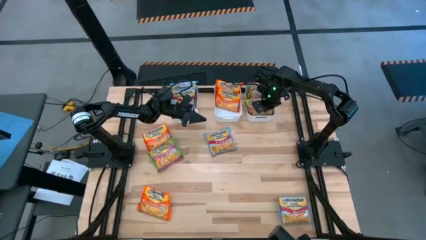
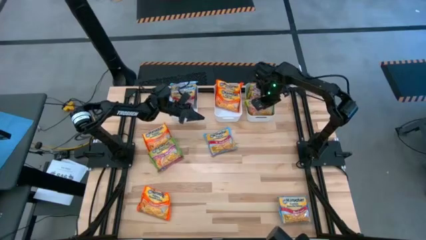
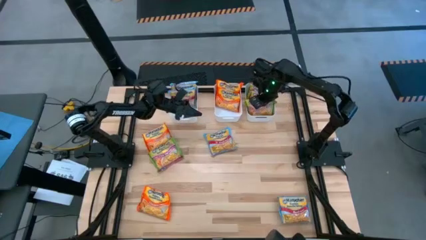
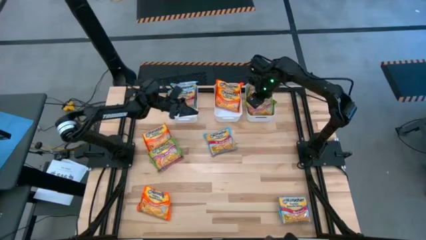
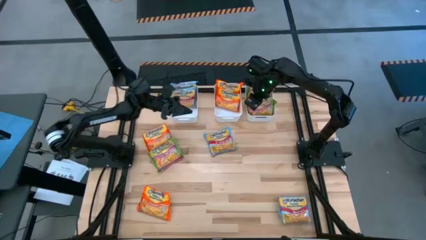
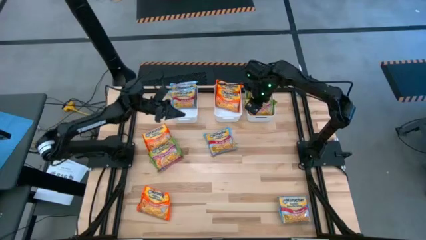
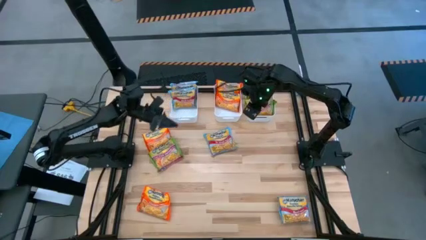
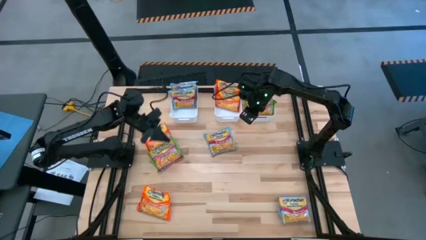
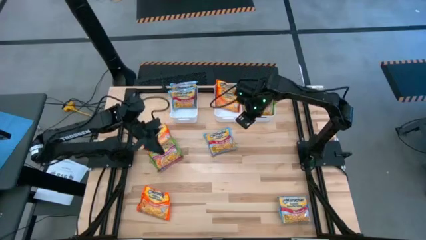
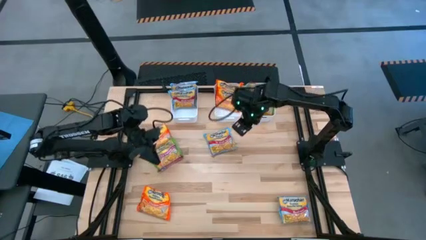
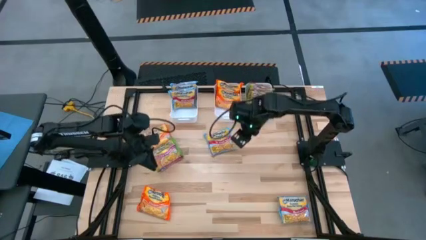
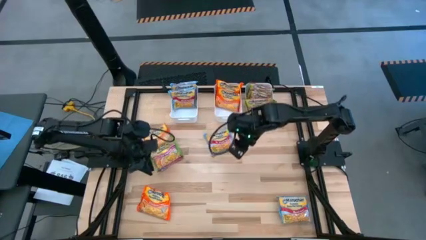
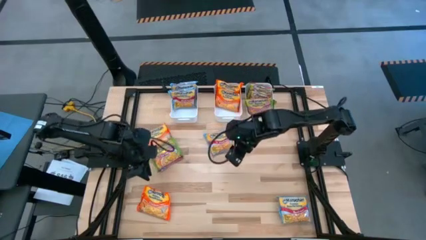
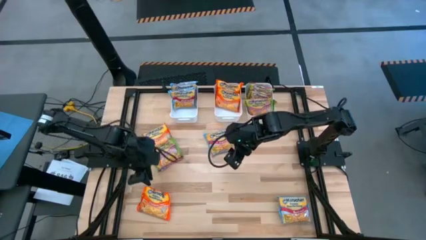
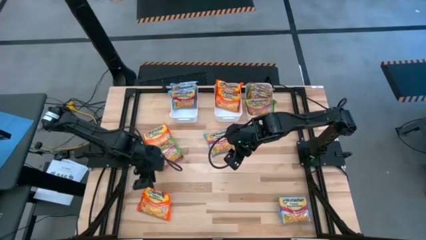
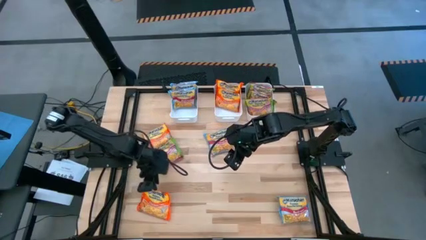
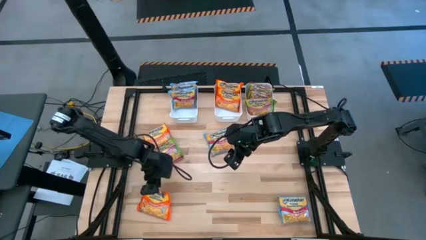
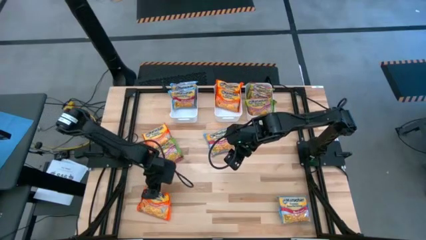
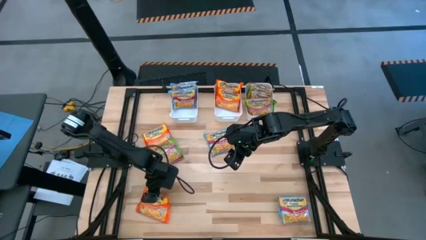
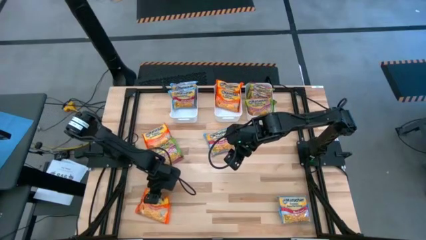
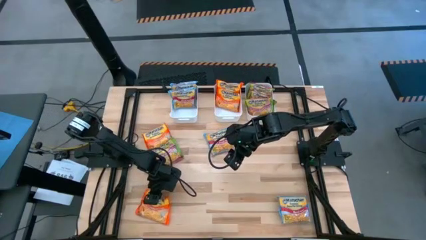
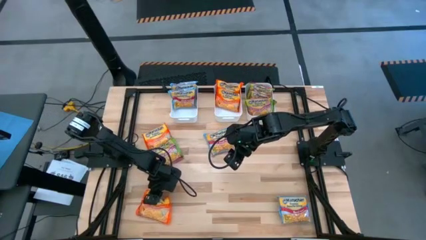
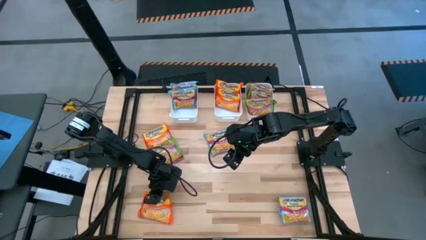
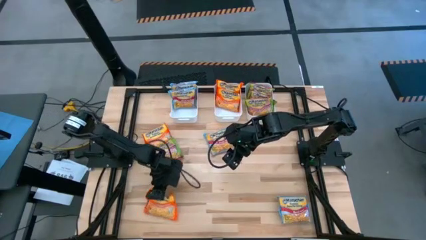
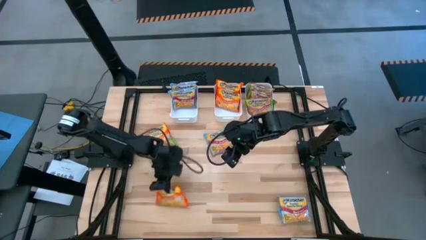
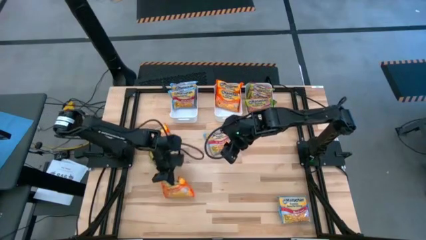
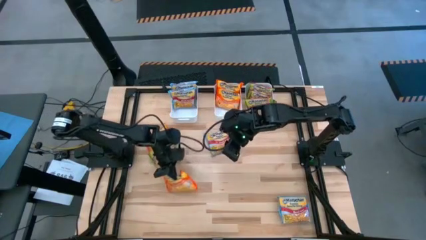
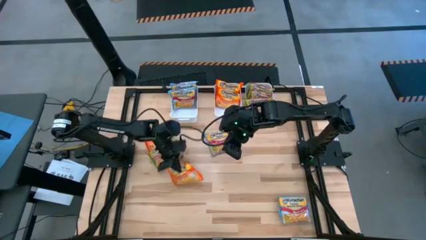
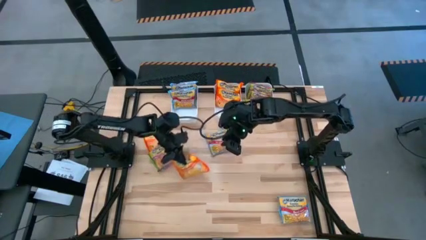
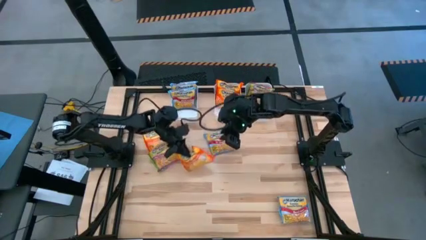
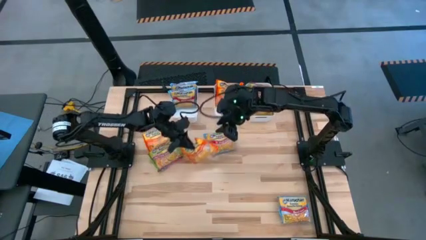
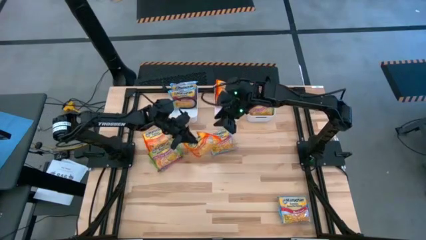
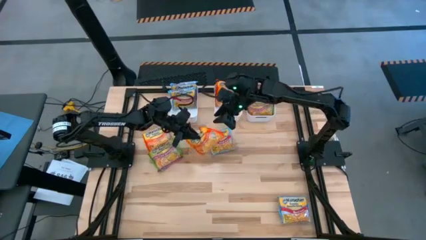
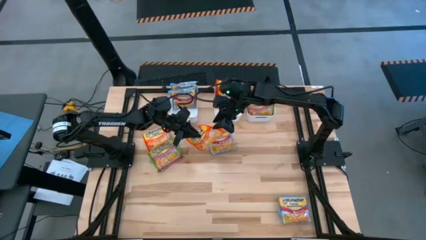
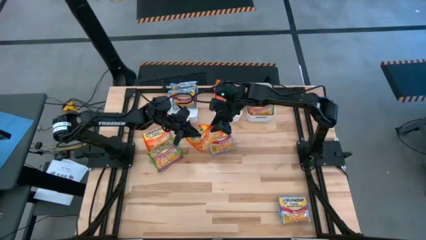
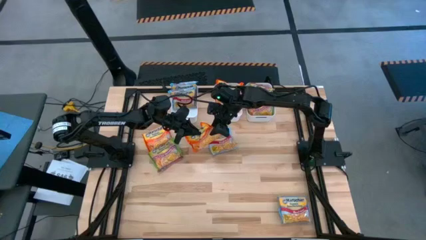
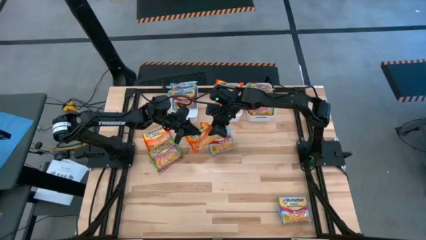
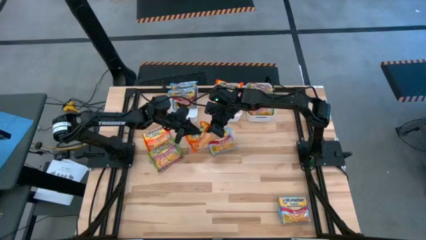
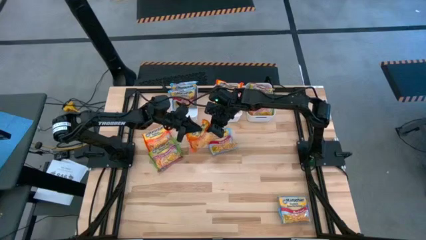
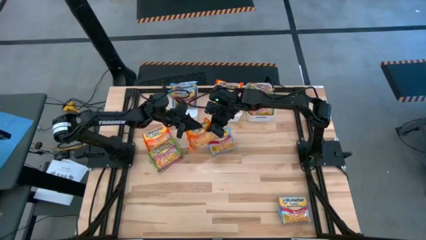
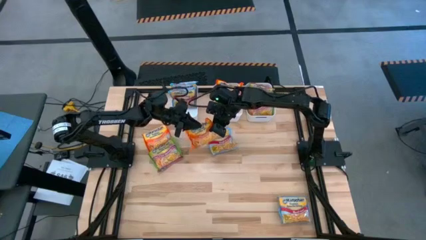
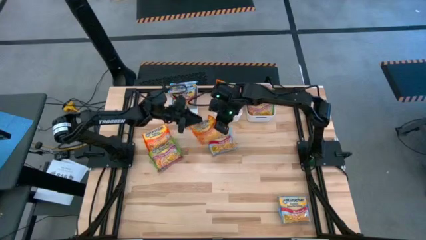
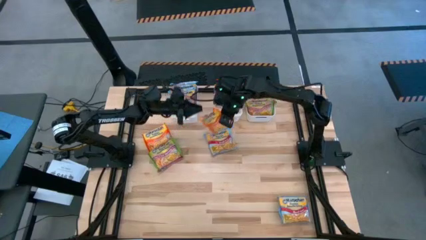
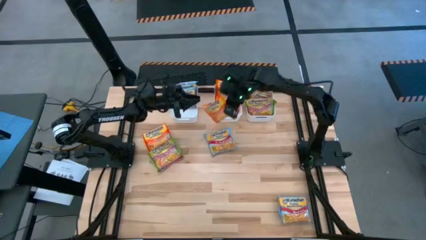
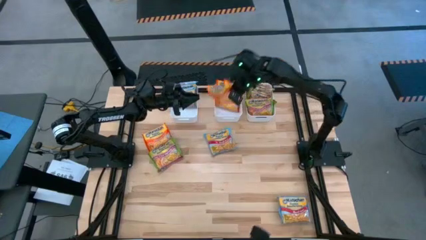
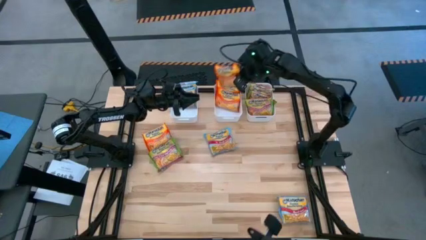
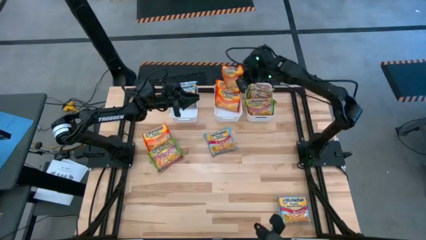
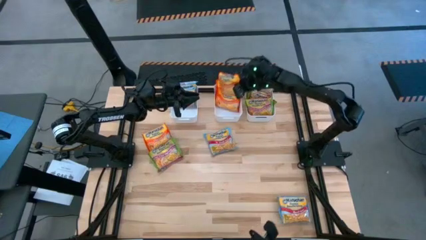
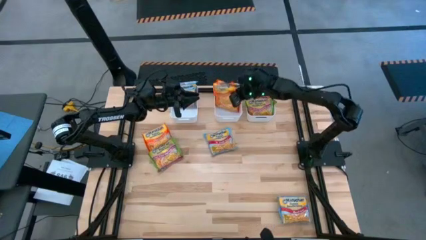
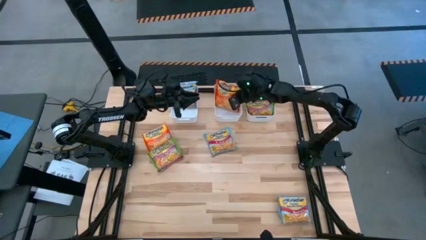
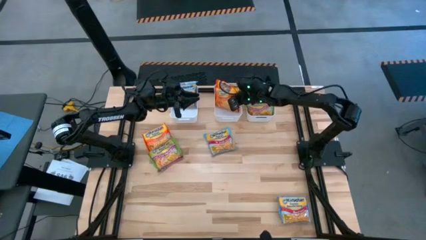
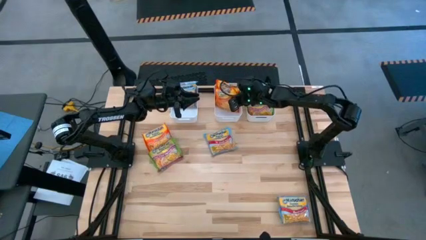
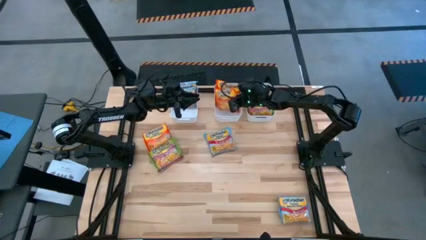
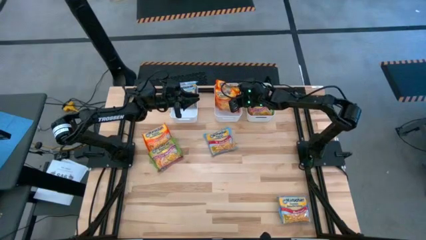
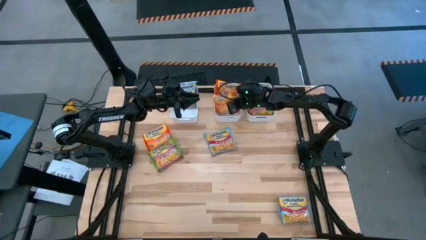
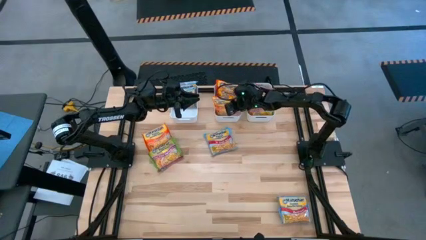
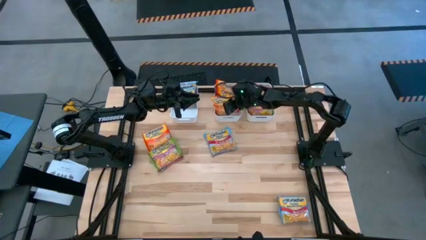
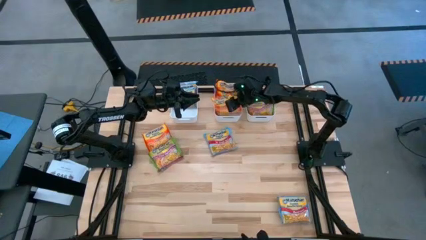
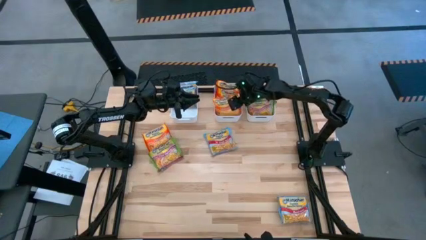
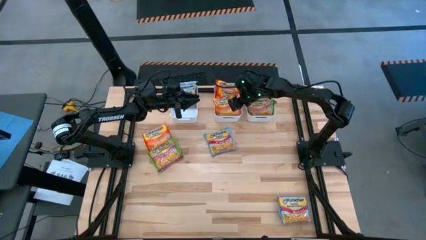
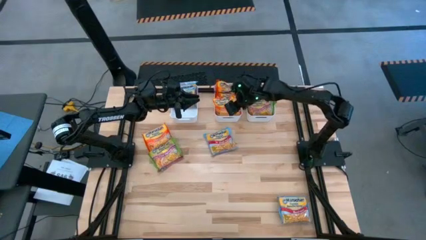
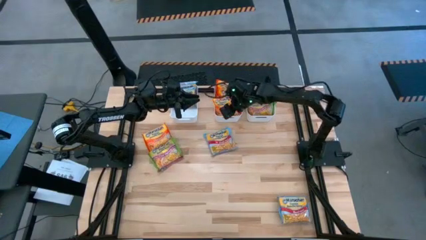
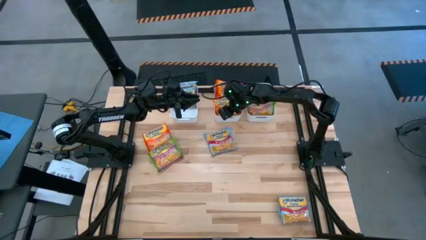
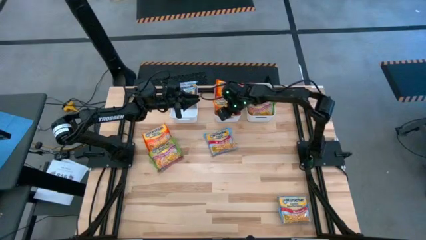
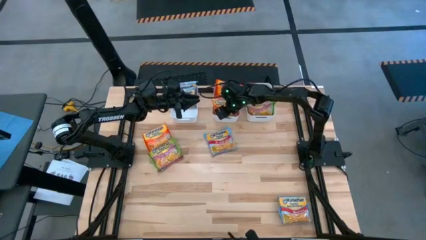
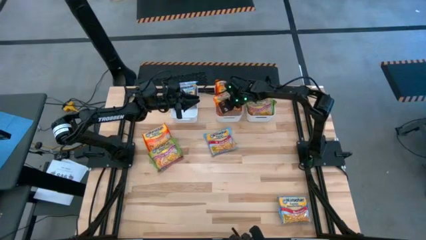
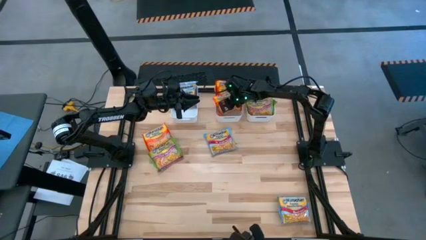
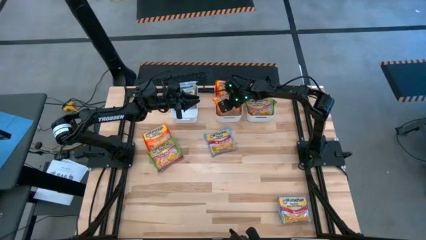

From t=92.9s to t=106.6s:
Task: Sort Maruchan noodles
Put the orange noodle pack into the middle white bin

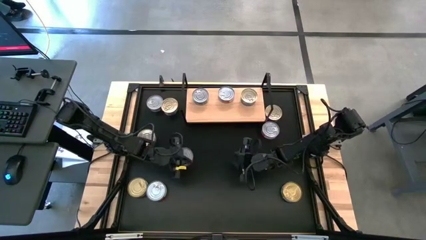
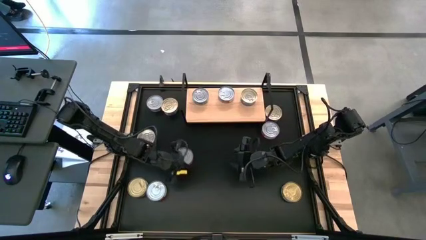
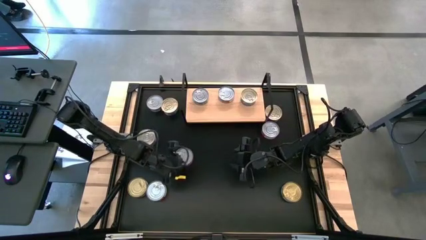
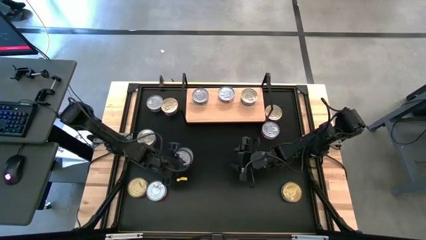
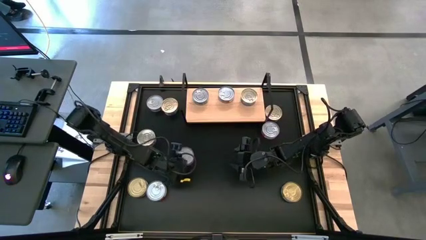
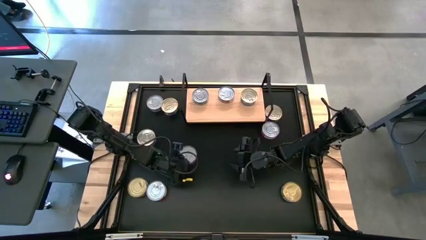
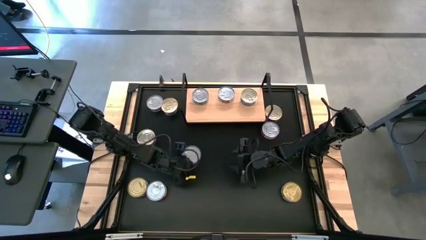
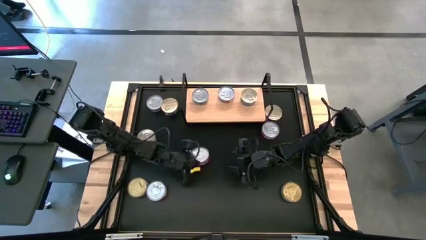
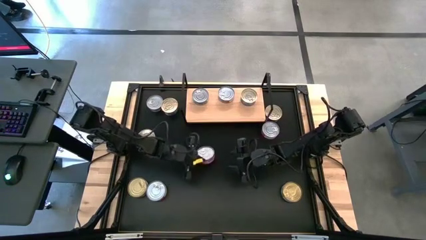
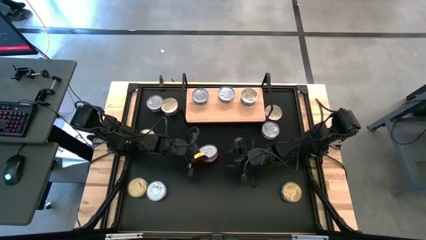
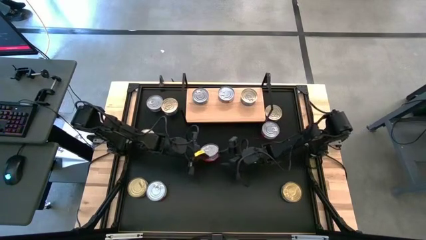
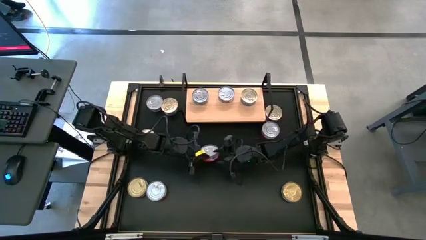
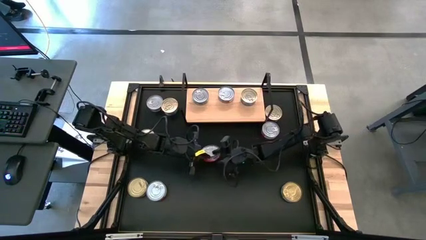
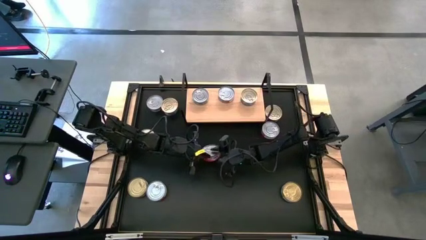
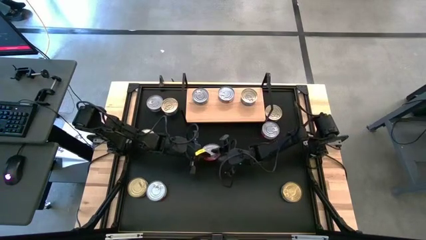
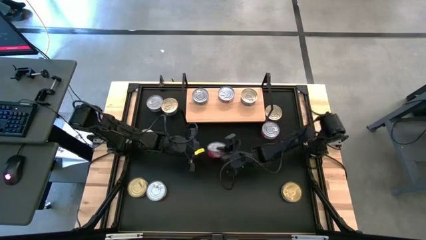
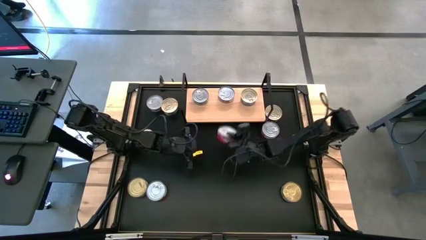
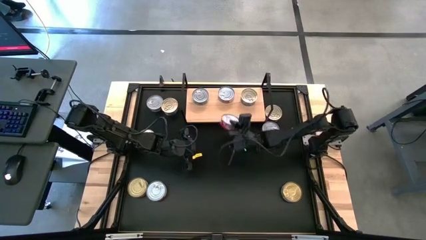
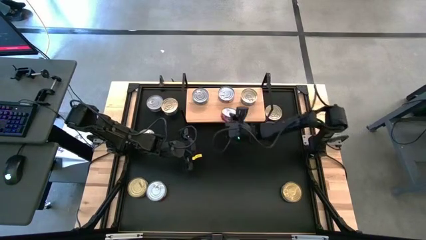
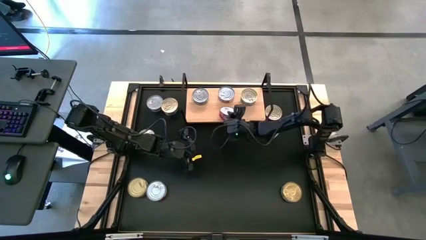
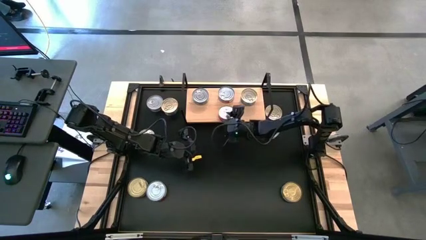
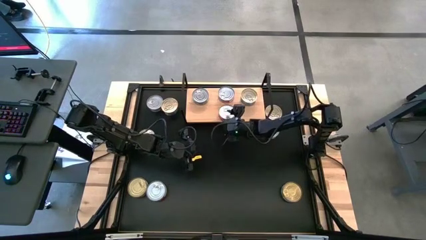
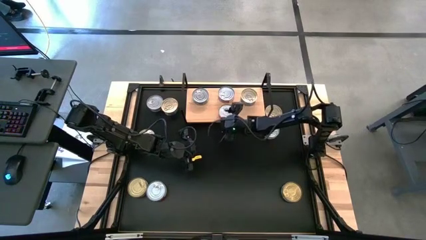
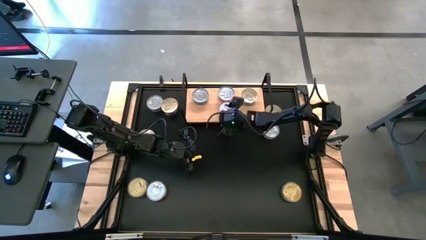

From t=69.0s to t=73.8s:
Task: Stack canned seafood by type on shelf
Put the red tuna can on the shelf aligned with the other red tuna can
